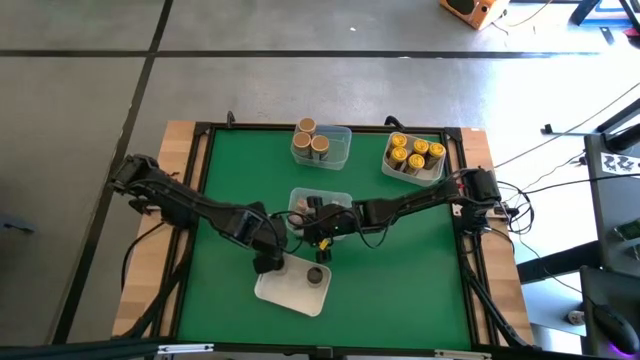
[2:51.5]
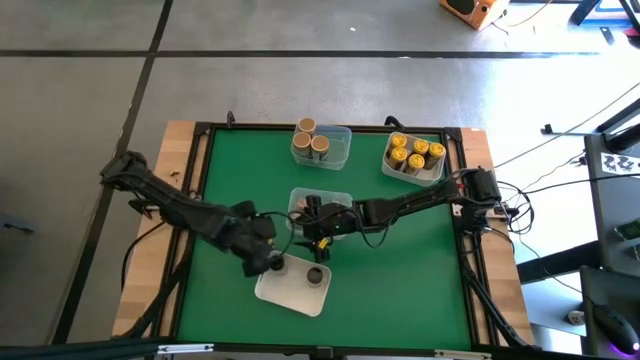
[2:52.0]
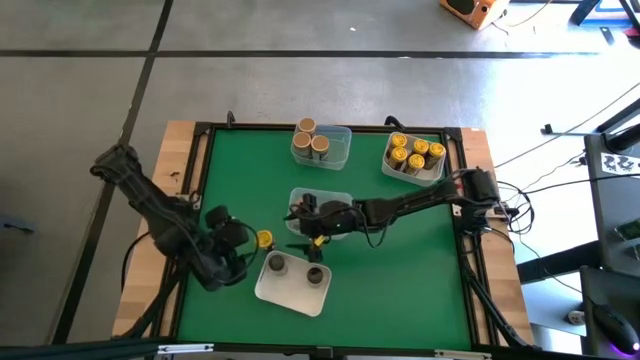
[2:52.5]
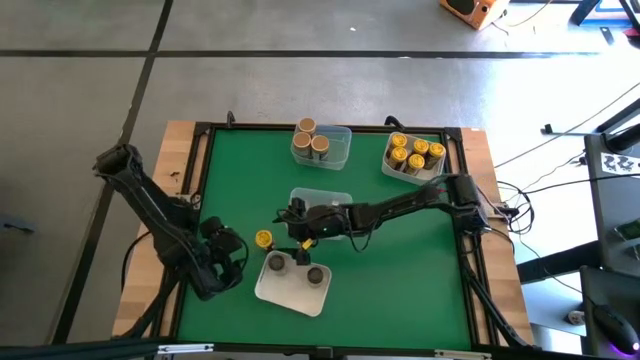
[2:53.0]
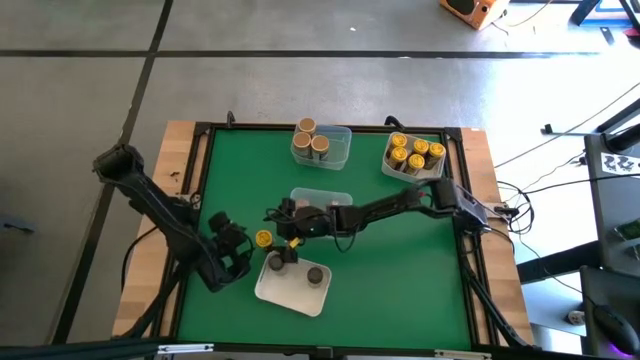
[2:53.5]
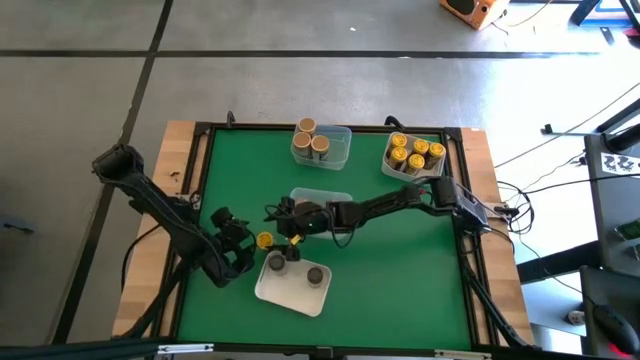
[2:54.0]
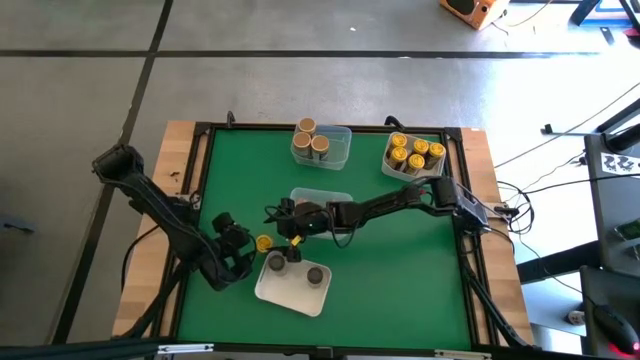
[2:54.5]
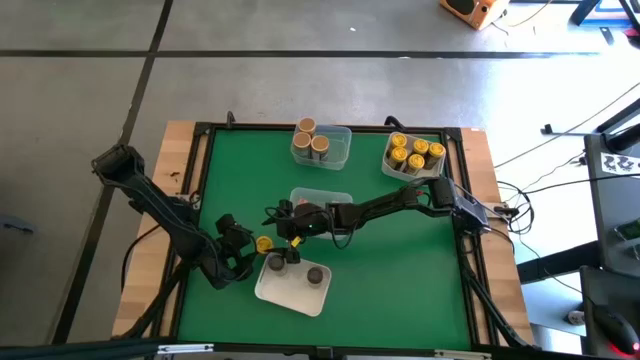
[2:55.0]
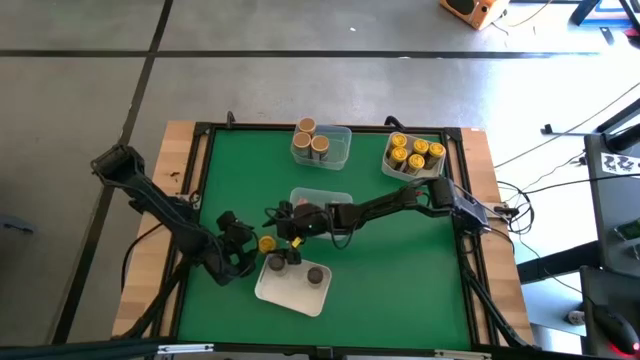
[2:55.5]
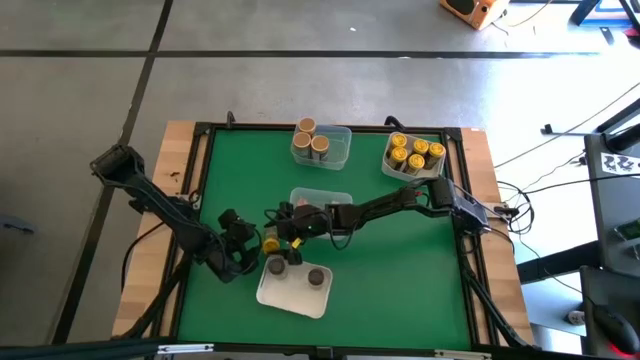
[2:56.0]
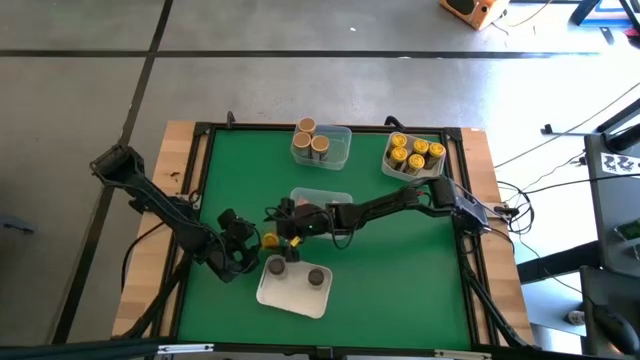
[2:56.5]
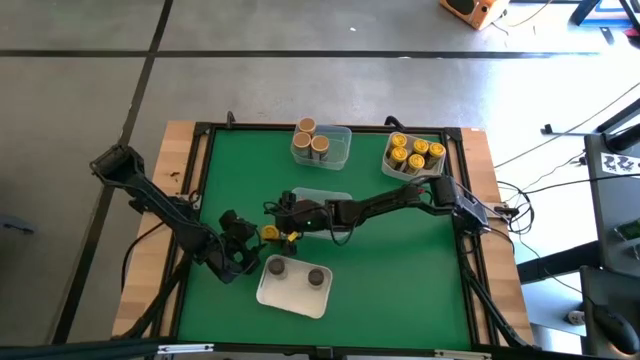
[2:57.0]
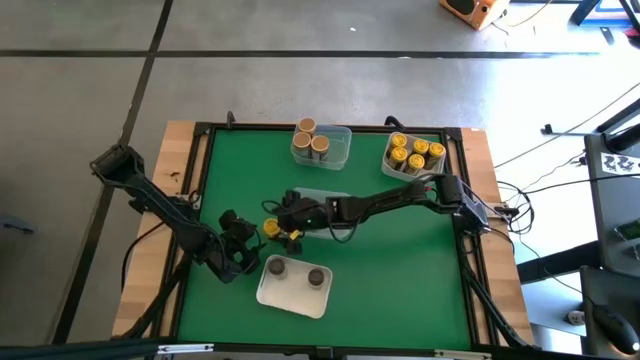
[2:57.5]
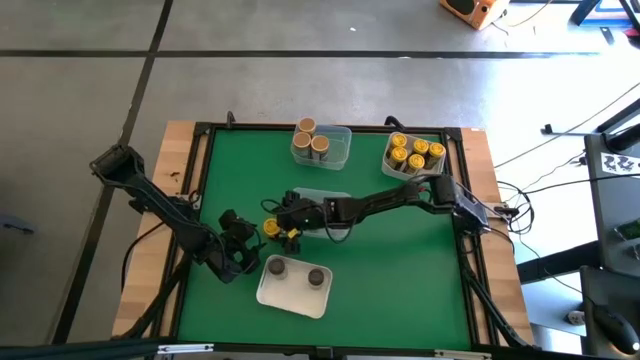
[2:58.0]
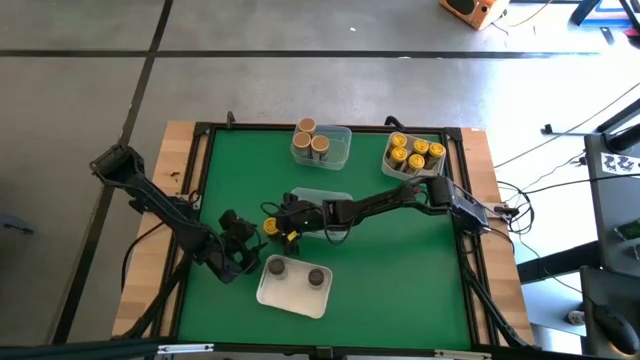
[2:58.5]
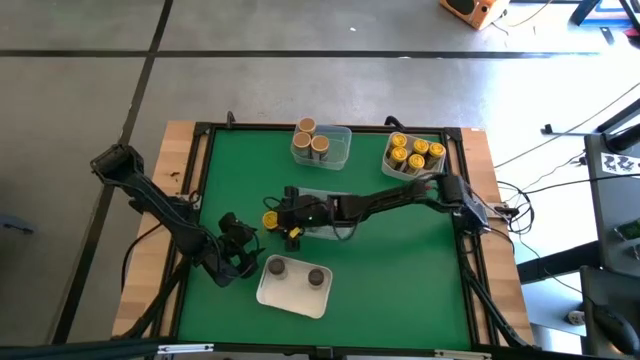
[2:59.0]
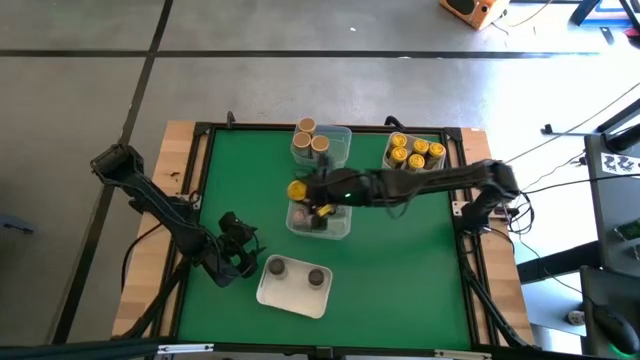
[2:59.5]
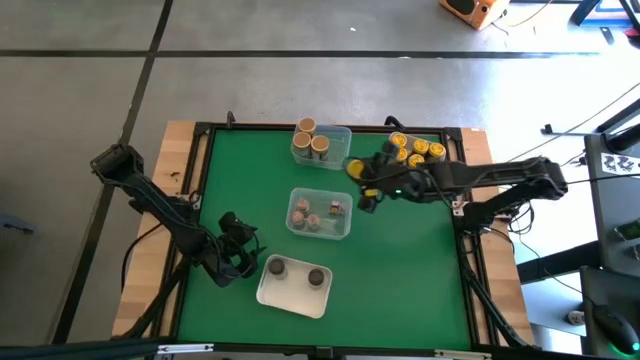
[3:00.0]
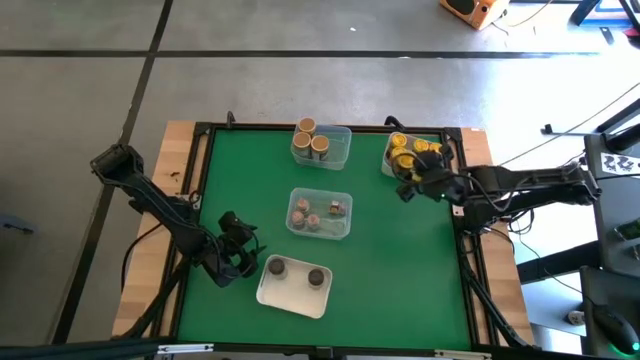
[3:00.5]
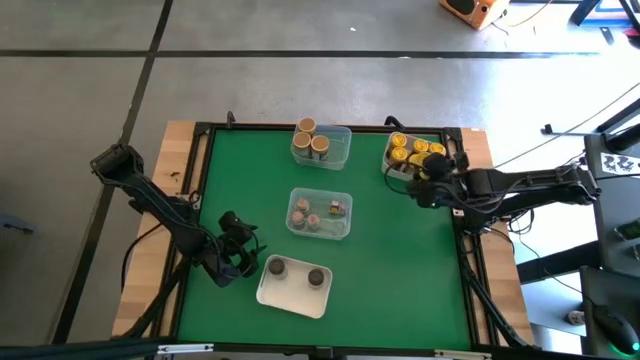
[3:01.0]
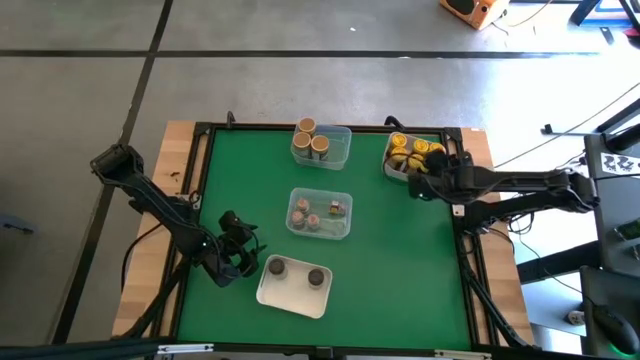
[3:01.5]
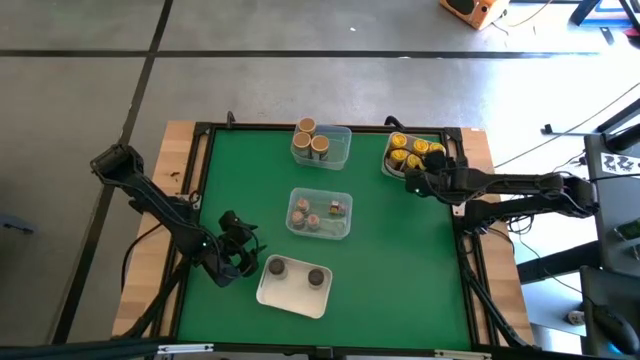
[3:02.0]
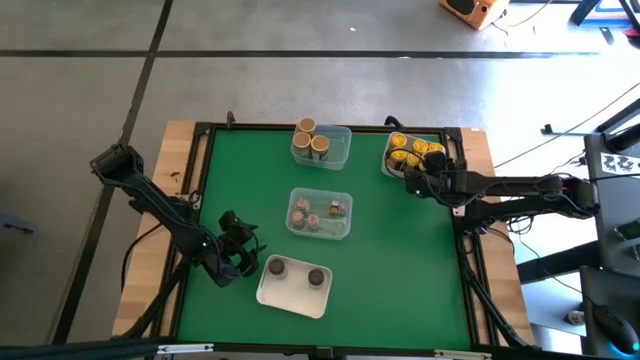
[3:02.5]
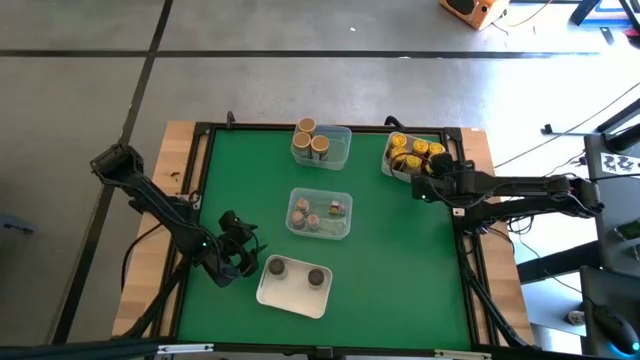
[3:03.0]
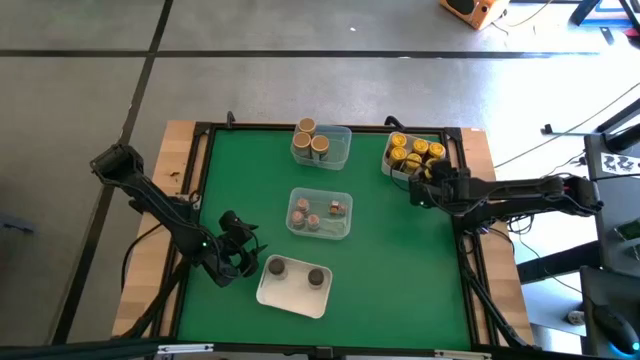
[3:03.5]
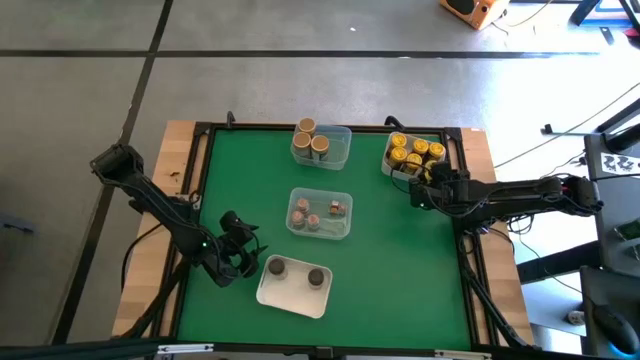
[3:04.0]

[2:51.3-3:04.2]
Task: Sort spices by type
Put the yellow seasoning bottle into the top white bin

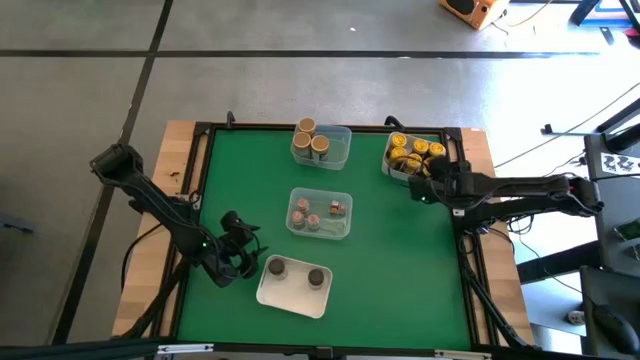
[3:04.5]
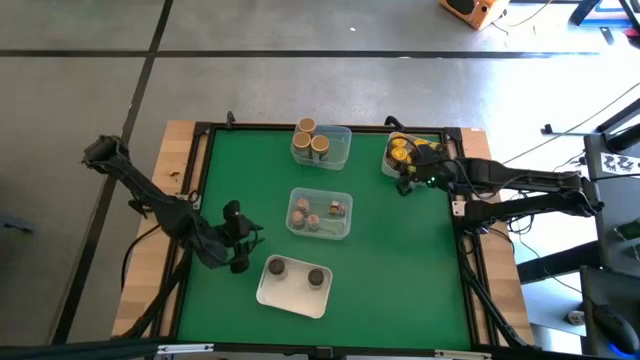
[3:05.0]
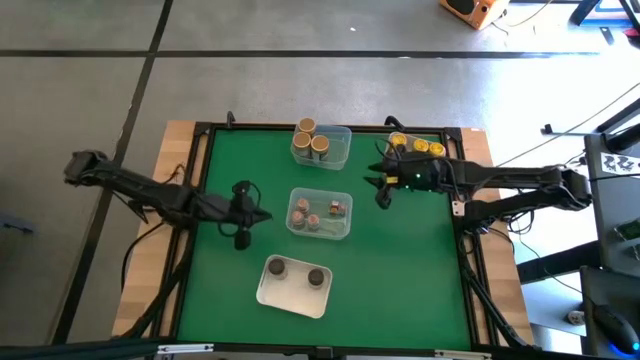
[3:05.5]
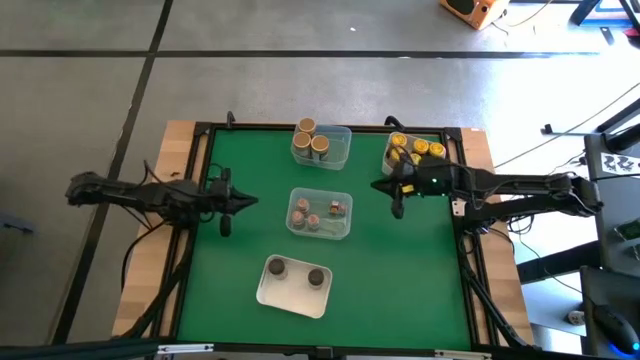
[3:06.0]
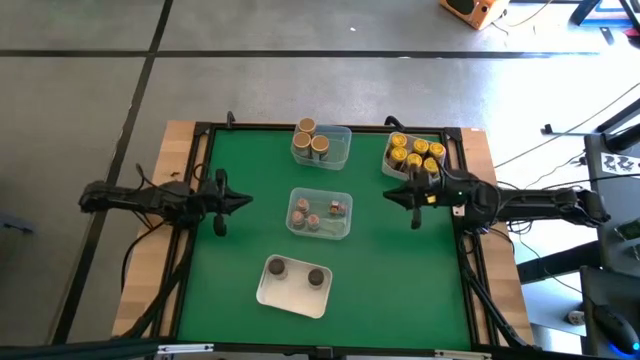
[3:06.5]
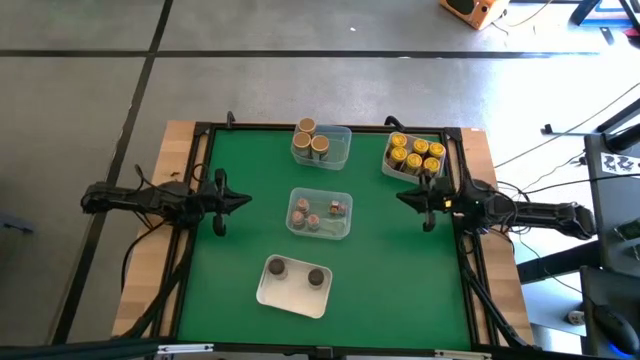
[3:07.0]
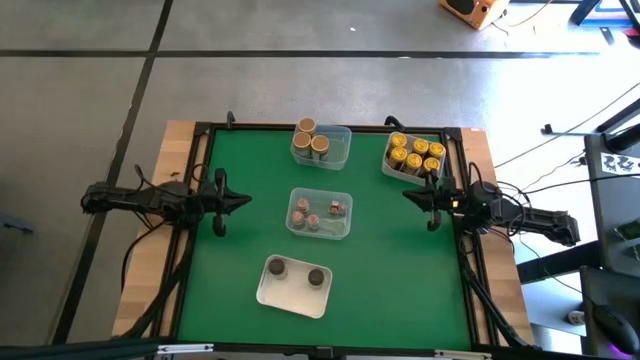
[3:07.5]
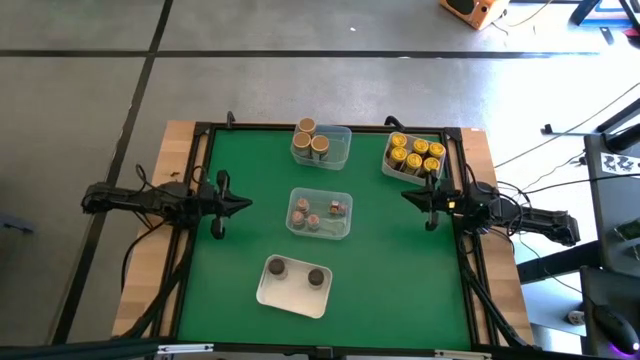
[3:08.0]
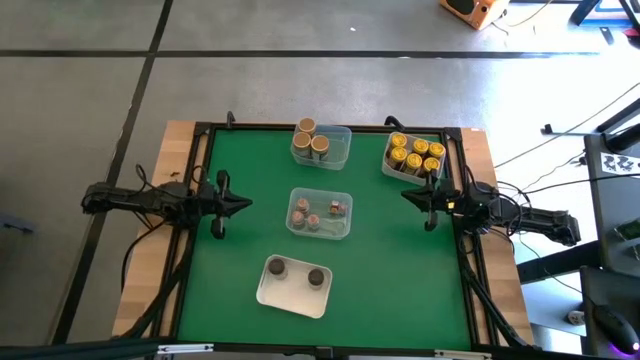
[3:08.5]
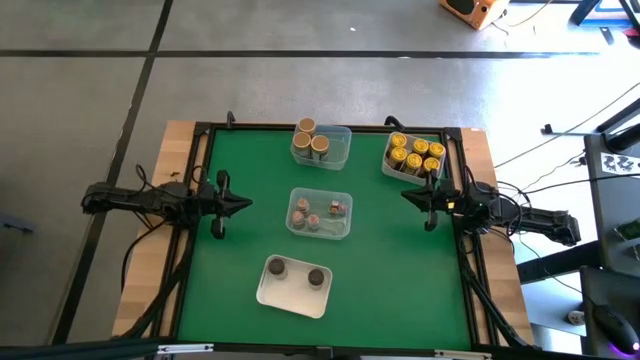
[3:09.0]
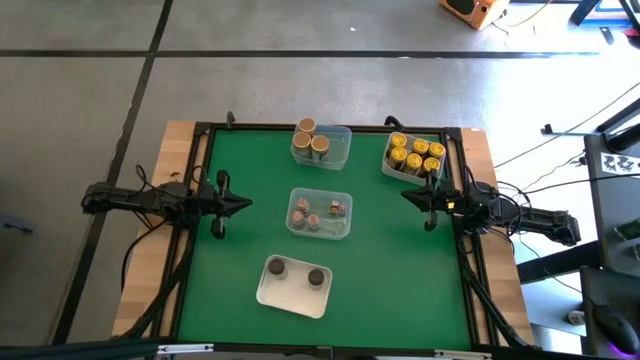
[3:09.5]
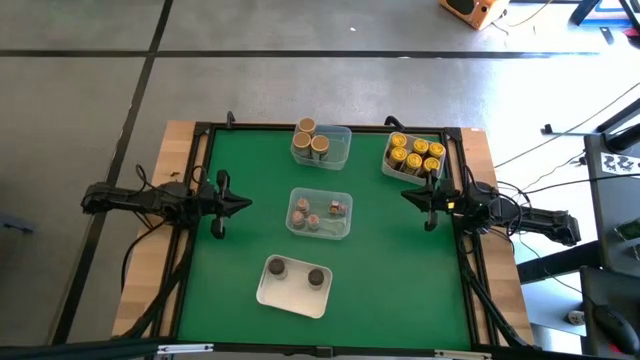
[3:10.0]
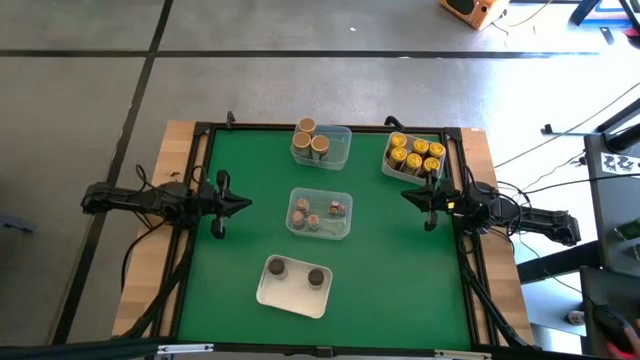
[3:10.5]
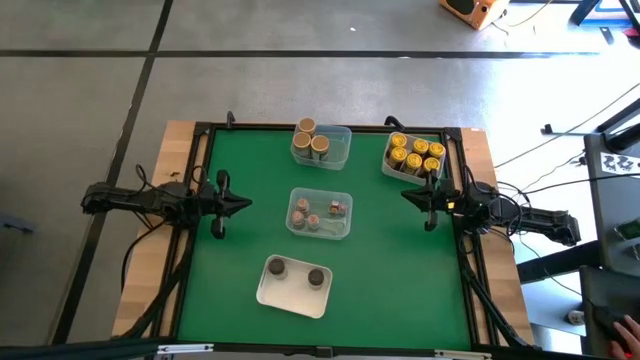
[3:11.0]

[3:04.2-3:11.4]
Return to Home Position

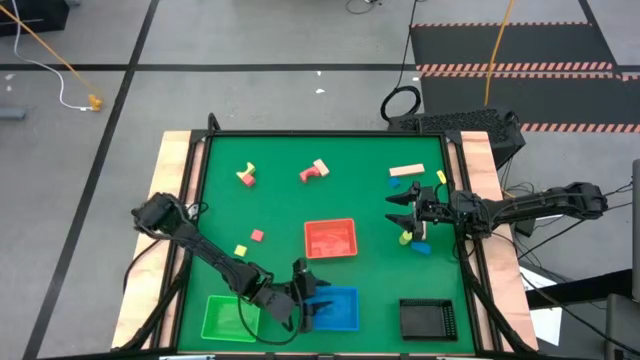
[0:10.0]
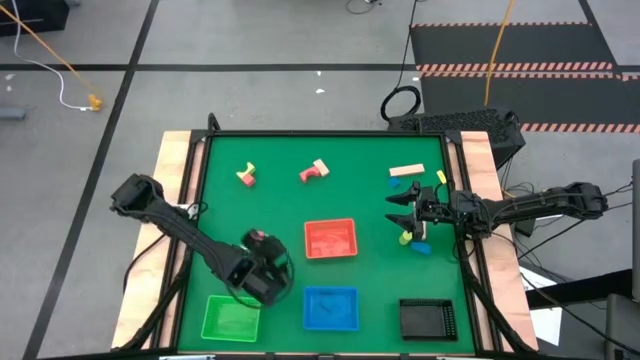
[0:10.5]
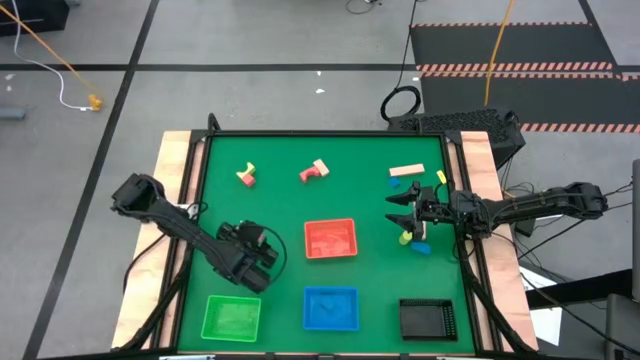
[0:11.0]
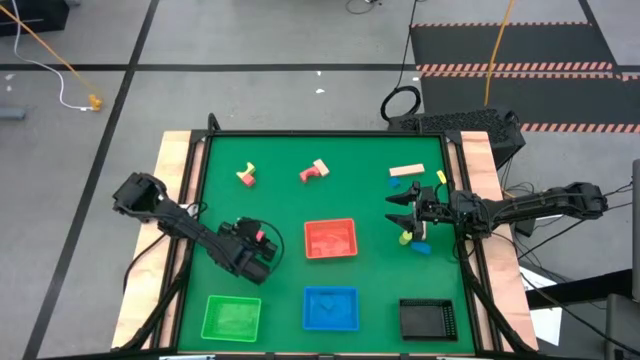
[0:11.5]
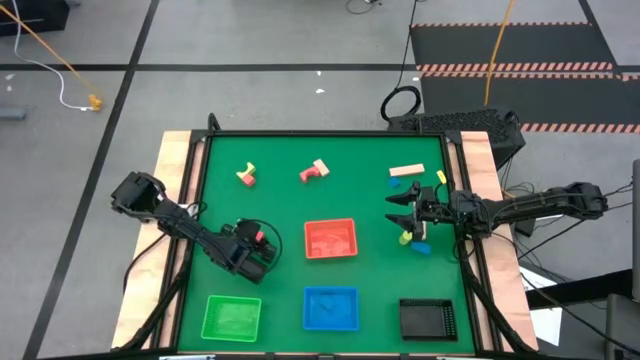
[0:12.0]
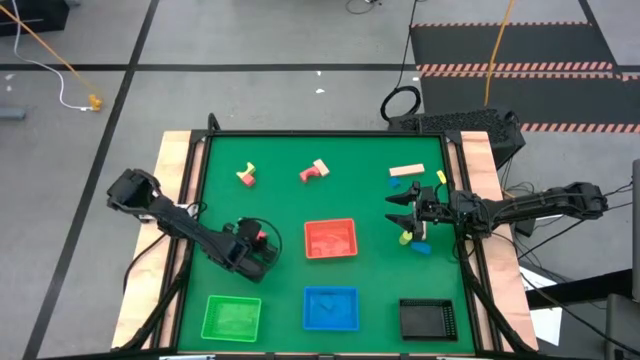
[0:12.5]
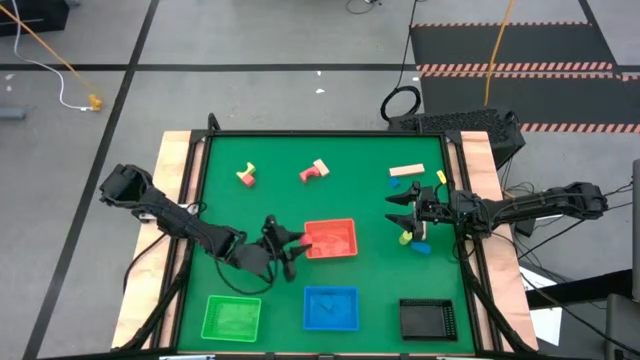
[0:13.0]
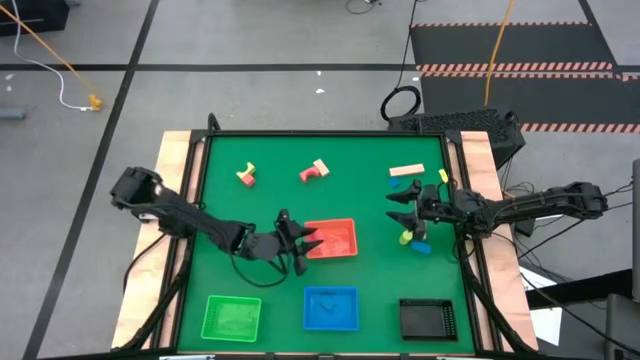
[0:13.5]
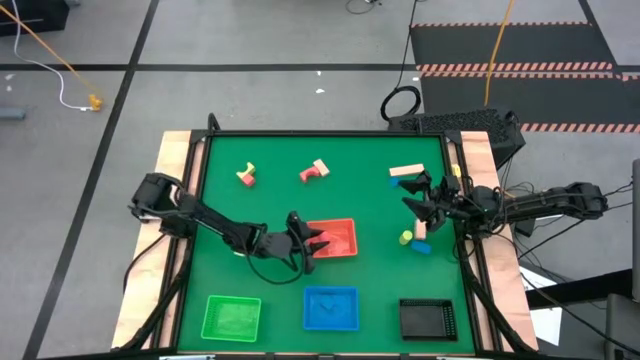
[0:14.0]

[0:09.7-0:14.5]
Task: Sort & place blocks by color
Put the bottom left orange block into the orange bin
